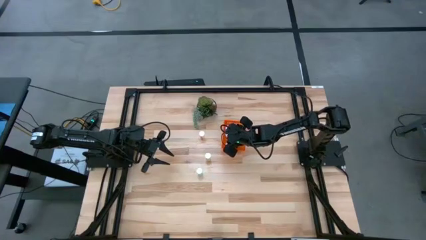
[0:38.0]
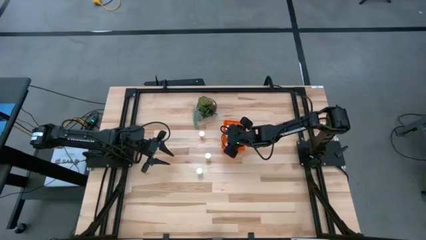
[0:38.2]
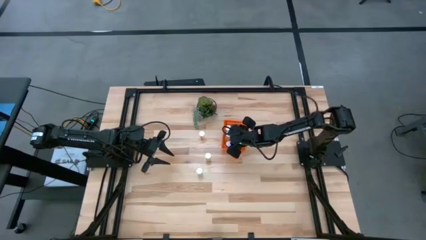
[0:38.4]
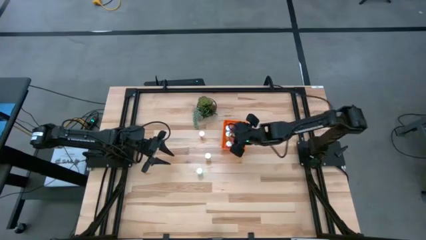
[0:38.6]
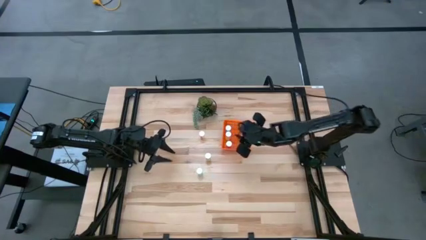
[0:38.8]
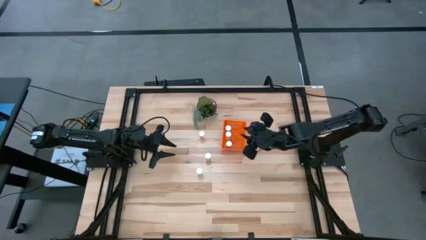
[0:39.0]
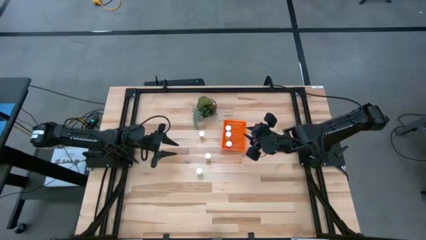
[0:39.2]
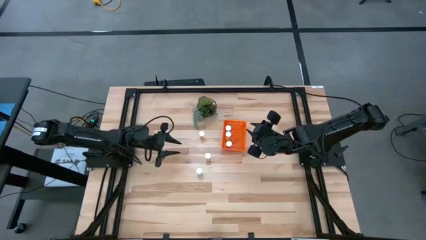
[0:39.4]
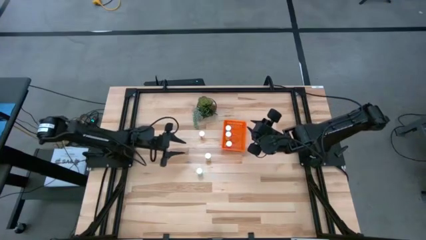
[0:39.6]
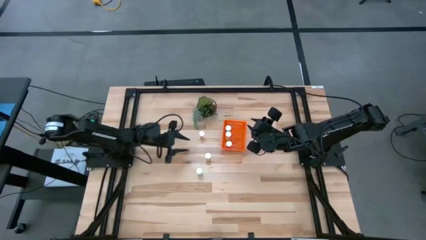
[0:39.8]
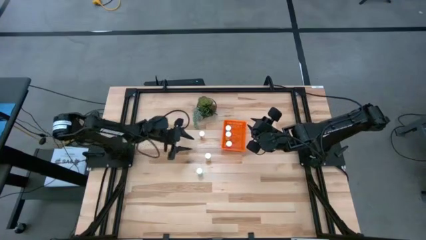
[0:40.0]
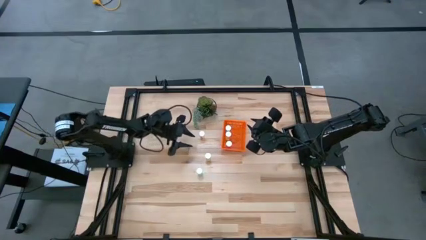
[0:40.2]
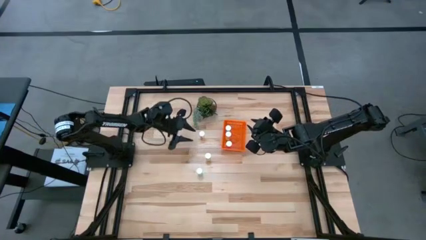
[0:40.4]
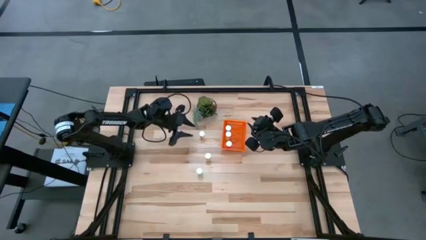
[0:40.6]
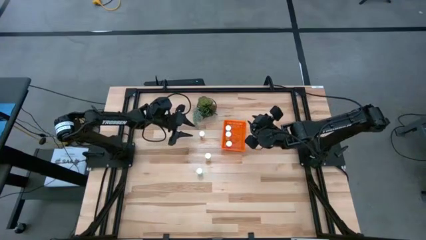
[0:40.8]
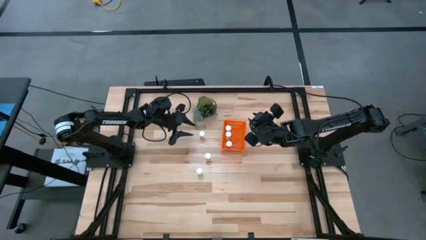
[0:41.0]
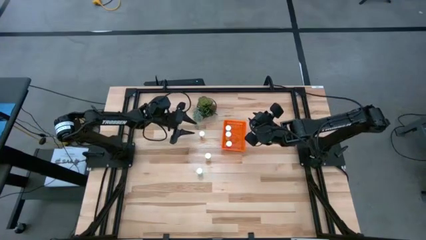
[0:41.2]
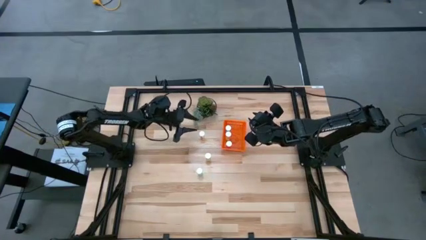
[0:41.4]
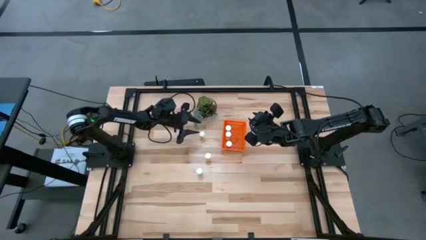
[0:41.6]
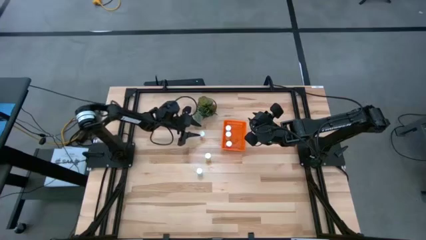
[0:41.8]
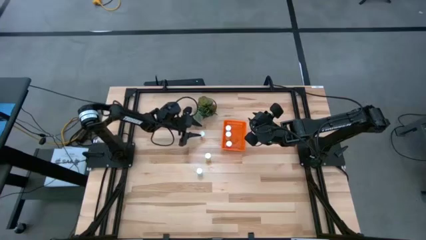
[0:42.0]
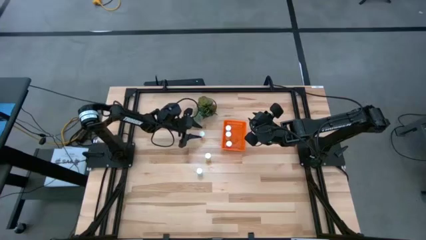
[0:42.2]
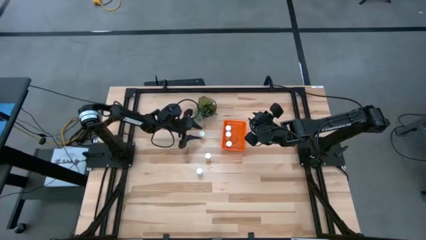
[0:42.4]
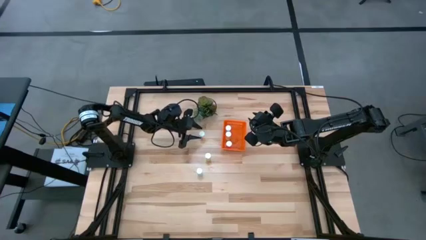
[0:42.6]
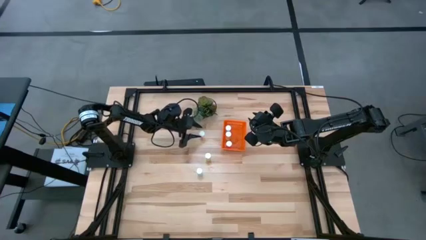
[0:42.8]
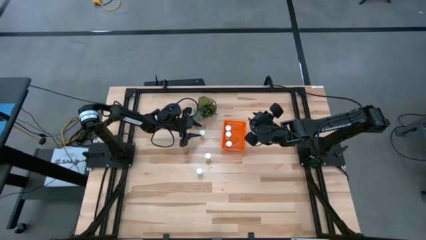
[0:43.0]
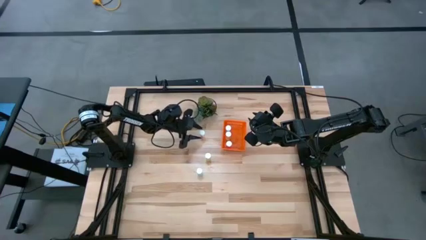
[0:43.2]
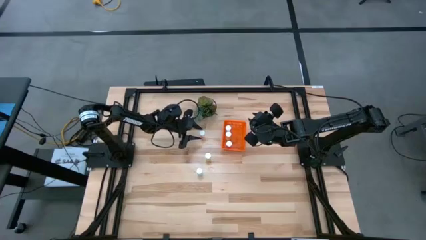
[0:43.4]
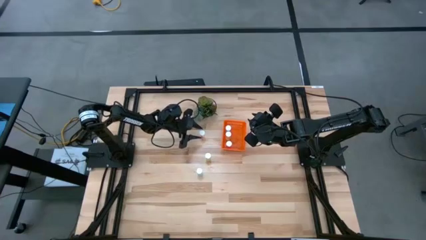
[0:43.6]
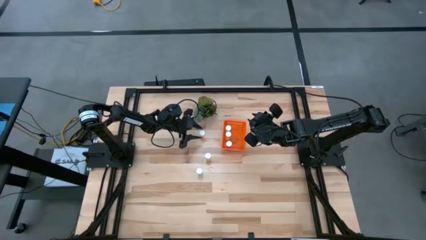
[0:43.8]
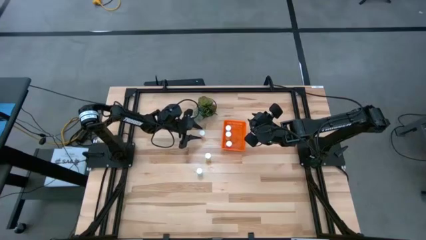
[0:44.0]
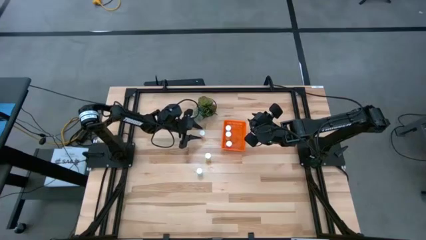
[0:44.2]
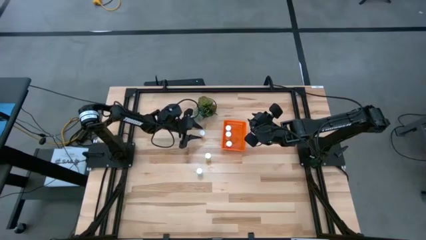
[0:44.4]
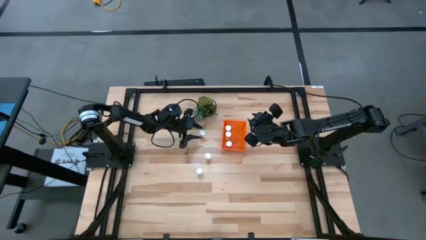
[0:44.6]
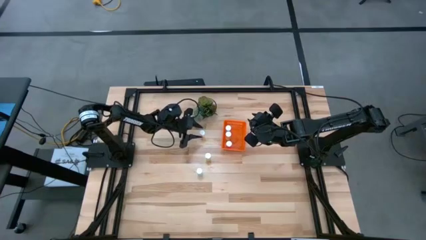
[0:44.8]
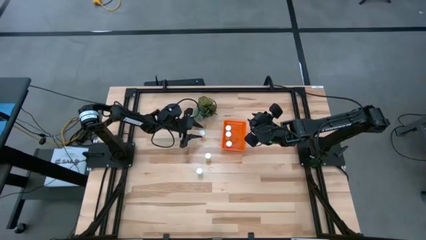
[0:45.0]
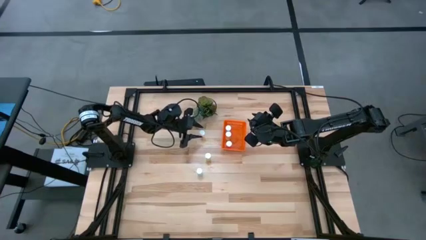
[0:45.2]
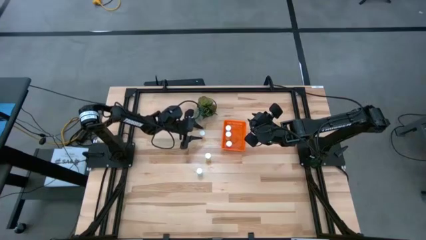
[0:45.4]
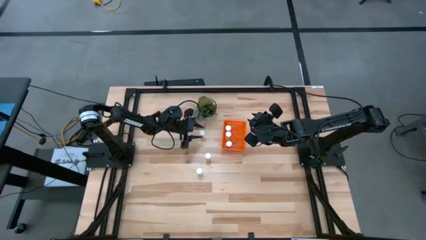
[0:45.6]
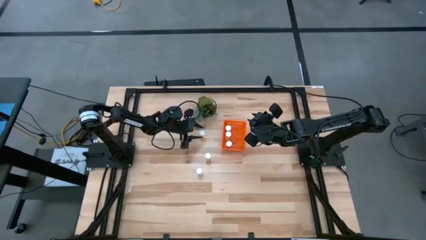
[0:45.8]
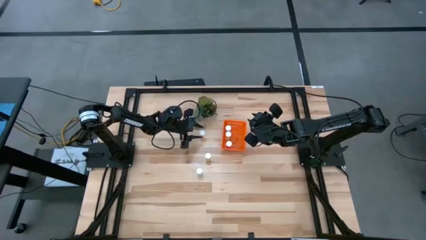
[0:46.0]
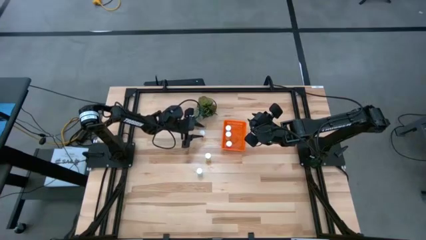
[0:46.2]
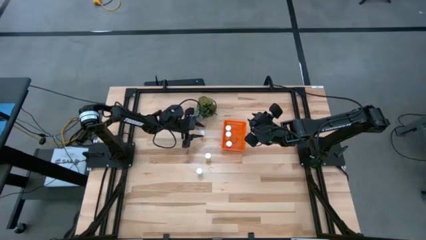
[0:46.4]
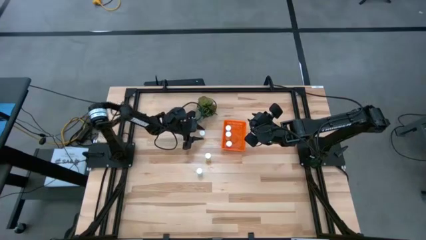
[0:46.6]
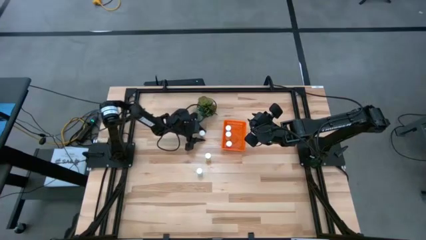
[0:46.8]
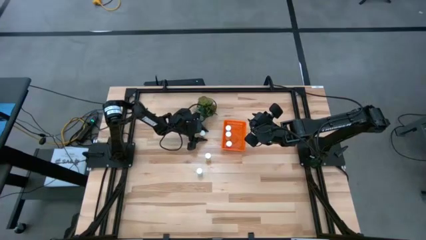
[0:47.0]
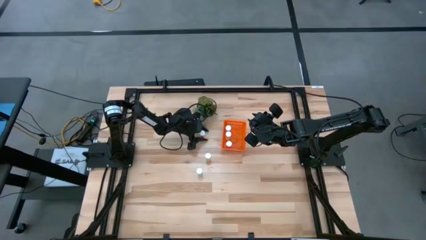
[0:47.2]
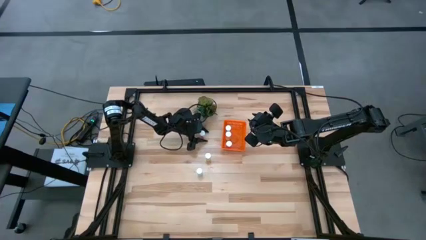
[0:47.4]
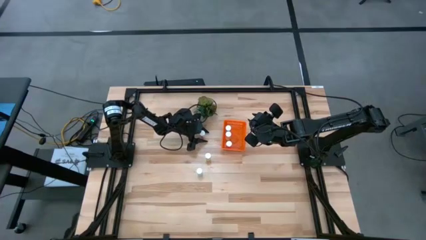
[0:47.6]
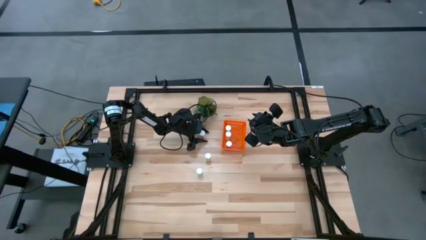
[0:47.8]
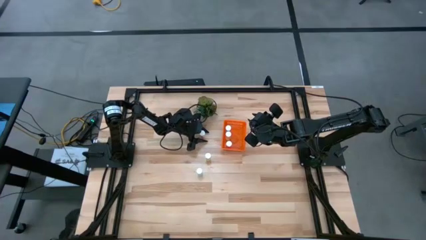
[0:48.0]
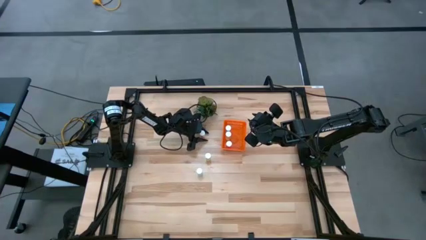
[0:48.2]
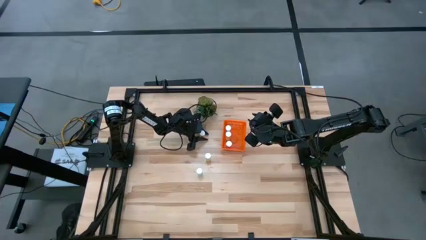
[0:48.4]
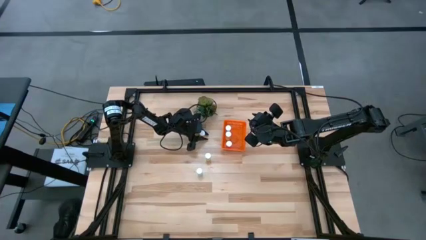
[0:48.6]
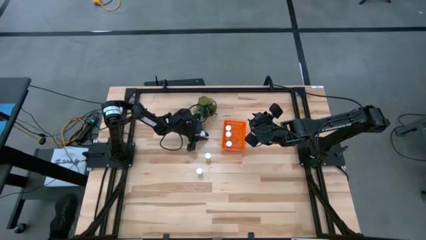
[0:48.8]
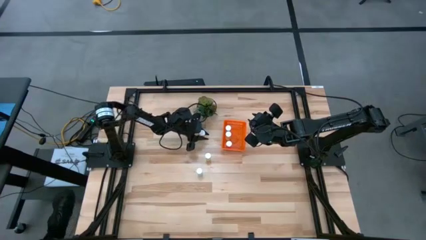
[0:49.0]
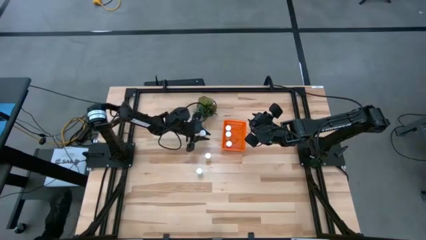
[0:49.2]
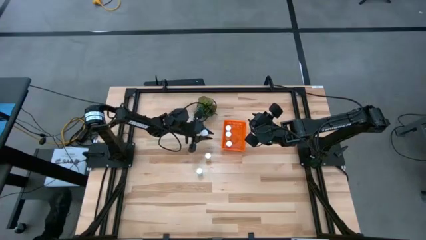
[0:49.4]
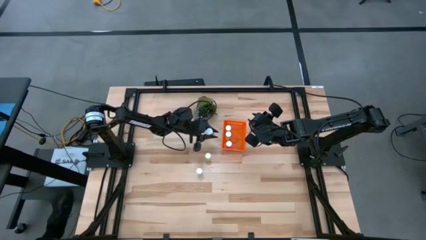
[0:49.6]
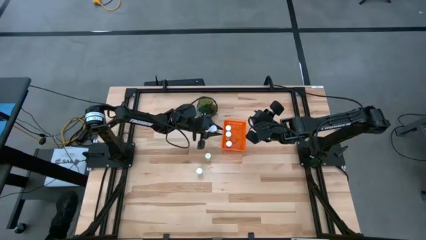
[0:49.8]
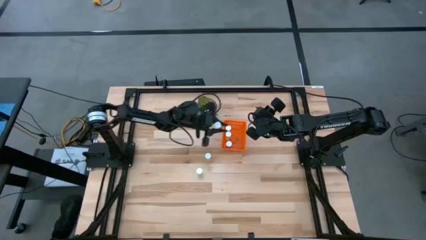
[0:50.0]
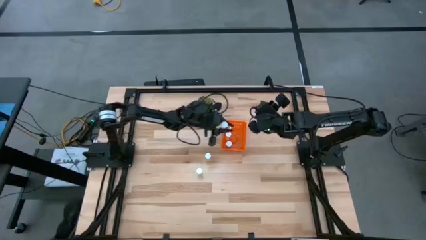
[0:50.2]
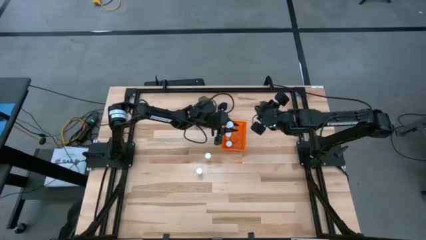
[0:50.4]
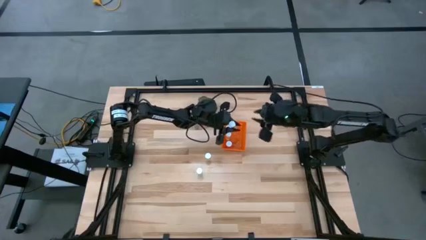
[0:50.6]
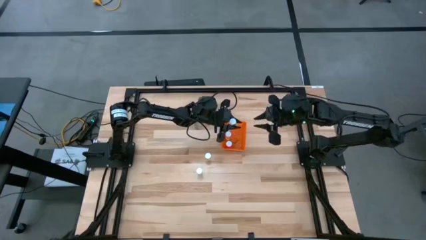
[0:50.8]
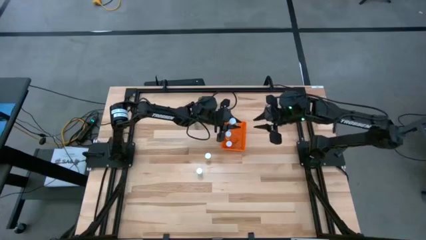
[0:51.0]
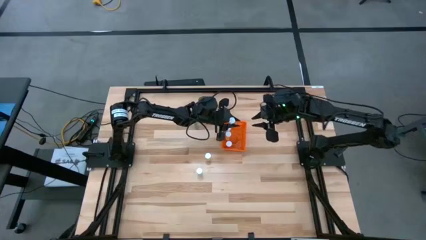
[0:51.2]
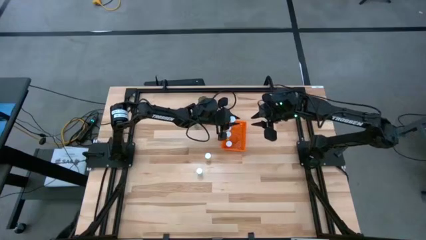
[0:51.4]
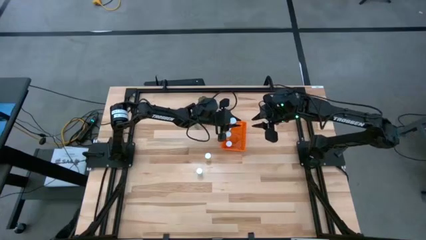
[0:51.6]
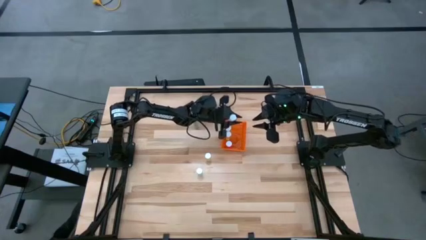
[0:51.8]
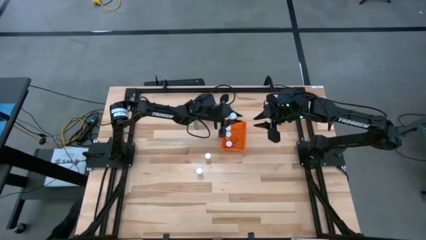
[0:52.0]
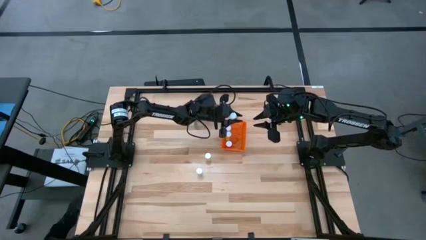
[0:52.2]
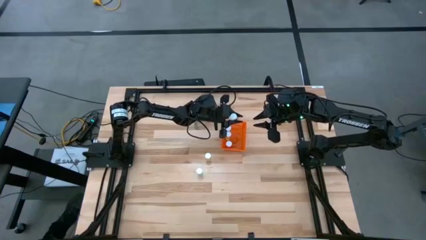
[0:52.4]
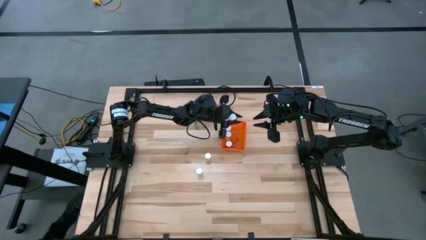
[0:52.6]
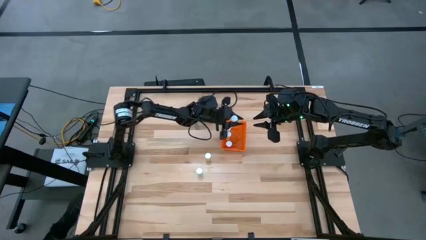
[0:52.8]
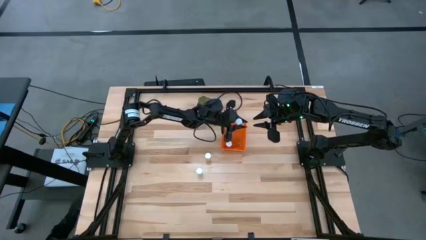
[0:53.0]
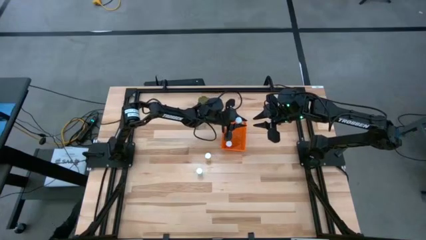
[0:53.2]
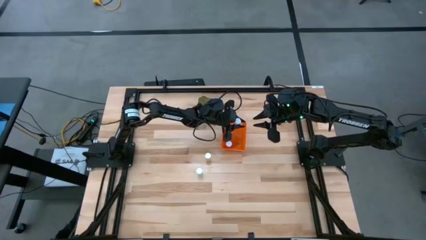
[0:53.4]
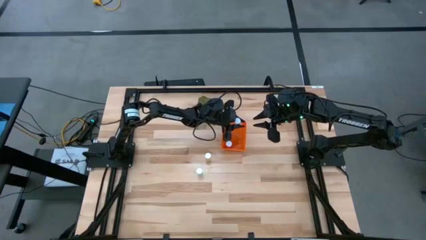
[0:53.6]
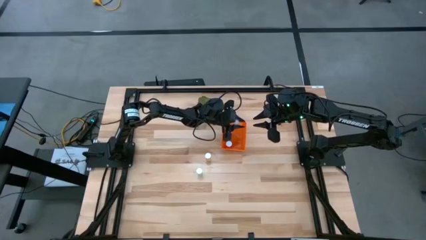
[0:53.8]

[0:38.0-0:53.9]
Task: Pick and place pill bottles into a basket
Put the top yellow pill bottle into the basket
